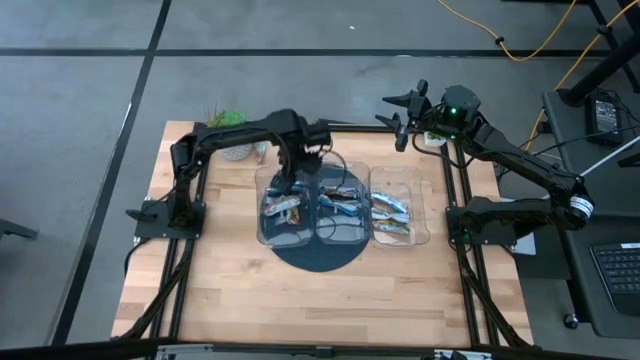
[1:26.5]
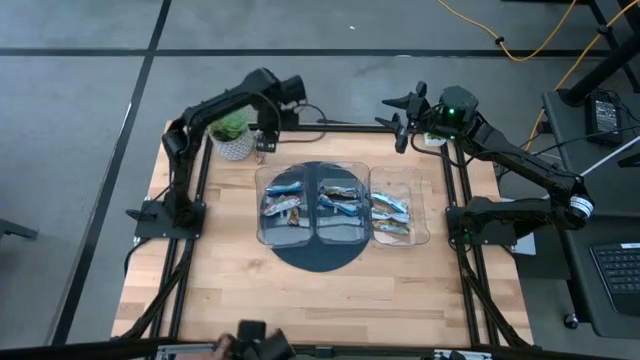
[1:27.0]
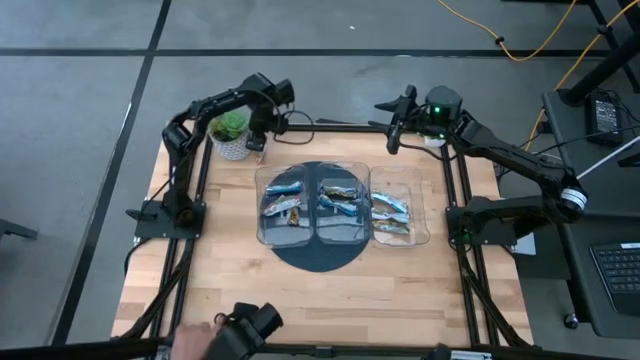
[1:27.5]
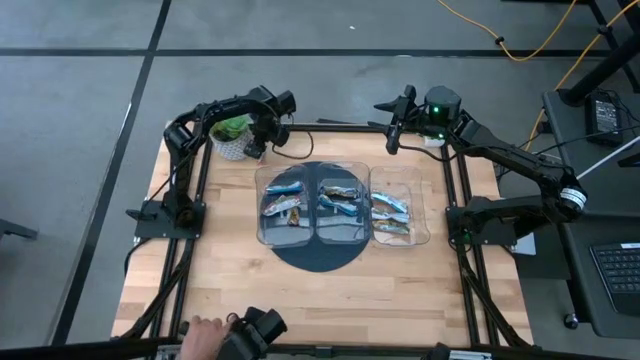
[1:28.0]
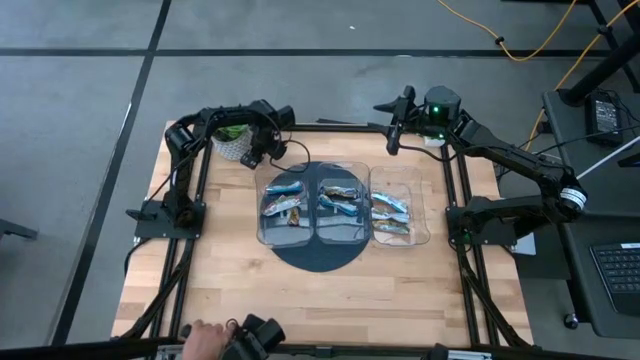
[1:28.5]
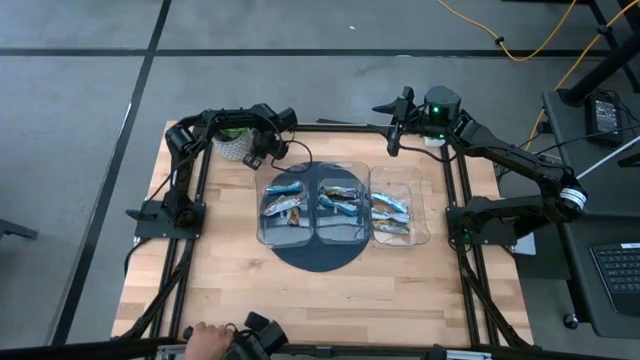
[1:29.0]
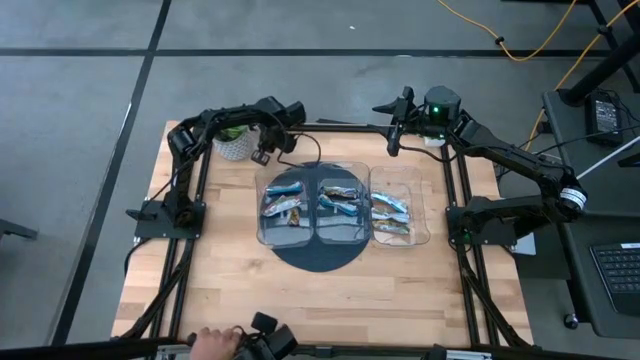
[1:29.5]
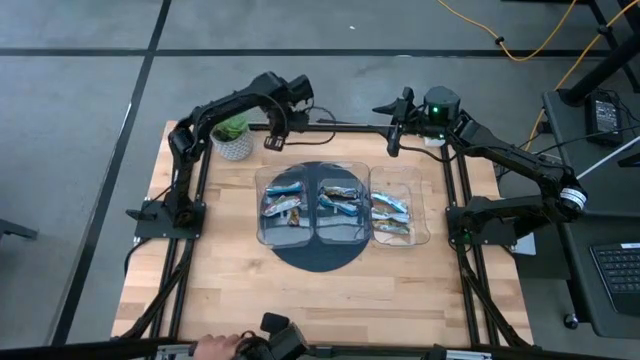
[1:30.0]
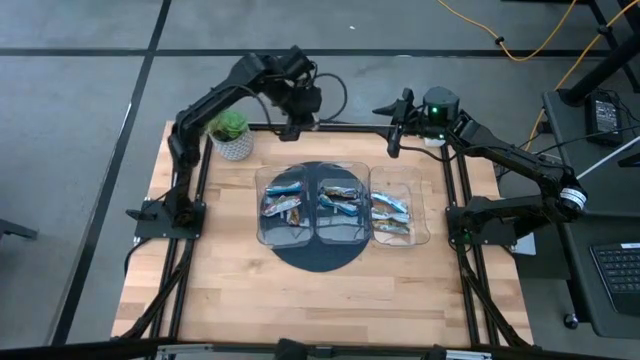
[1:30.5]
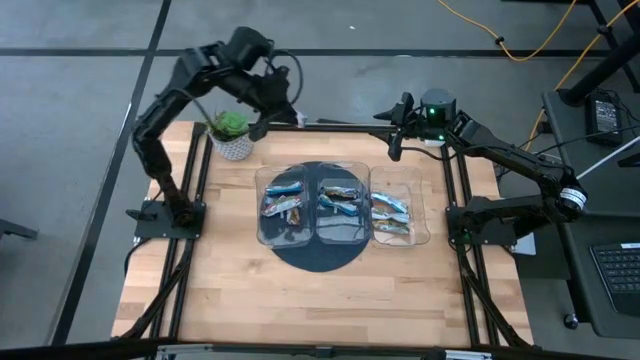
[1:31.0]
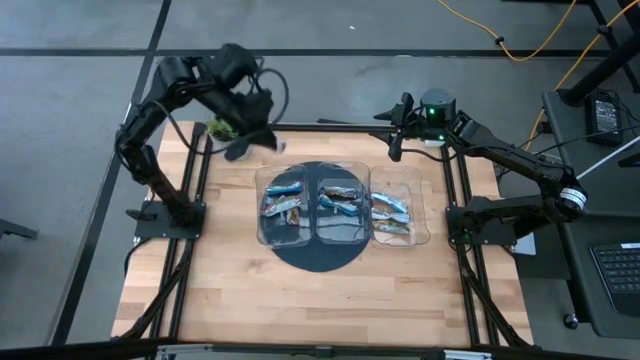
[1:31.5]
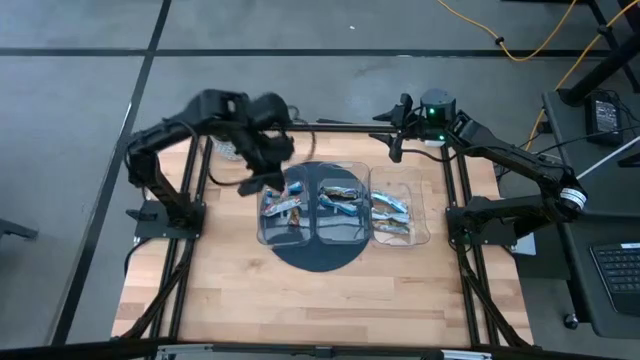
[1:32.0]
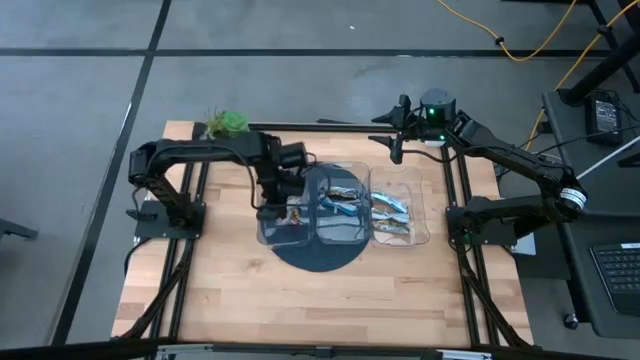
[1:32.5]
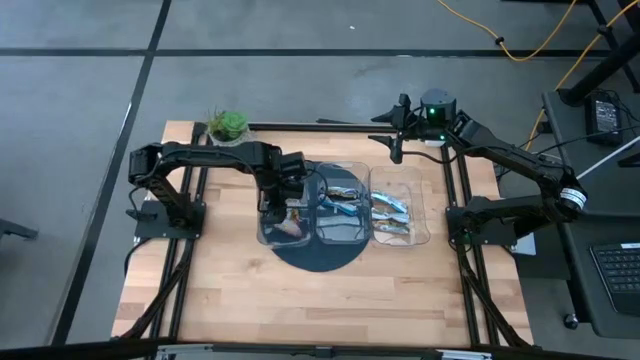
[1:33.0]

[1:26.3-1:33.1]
Task: Pick and place Granola Bars by type
Put the red granola bar into the left transparent bin

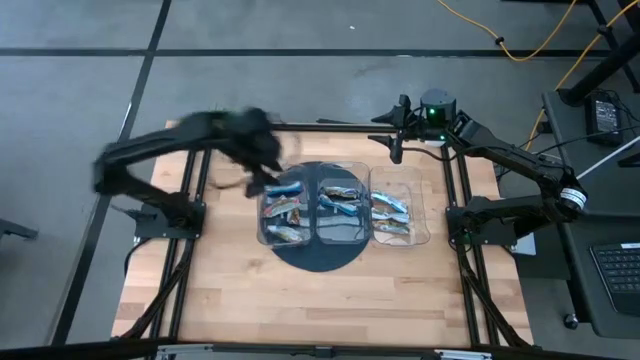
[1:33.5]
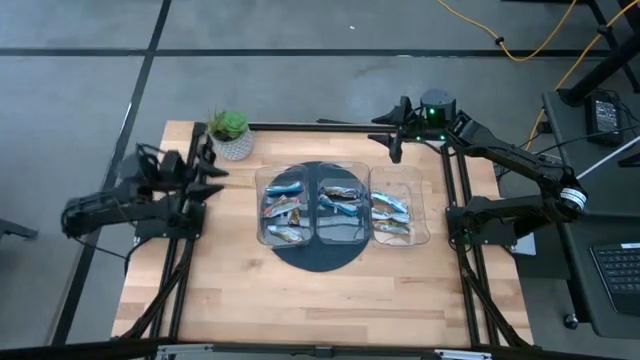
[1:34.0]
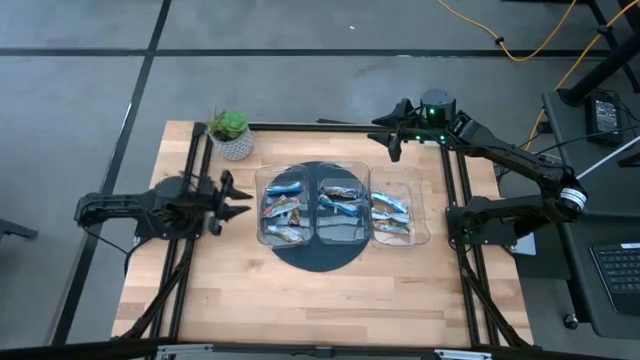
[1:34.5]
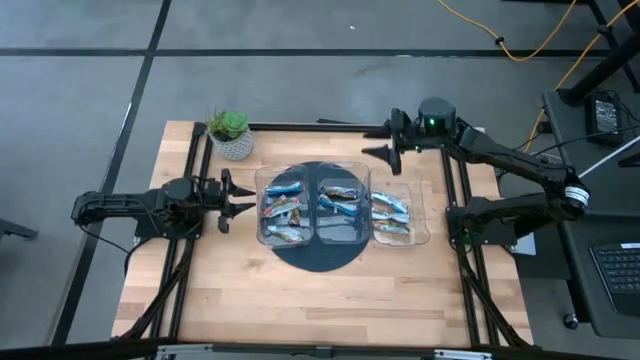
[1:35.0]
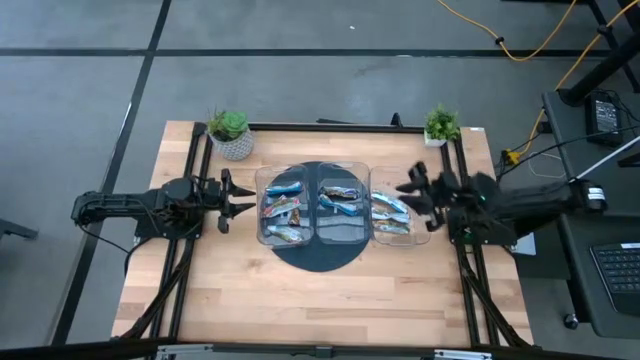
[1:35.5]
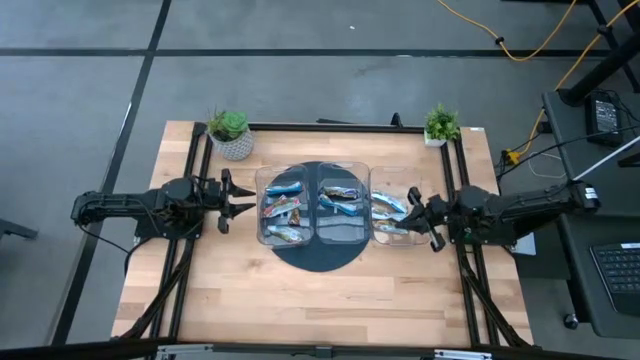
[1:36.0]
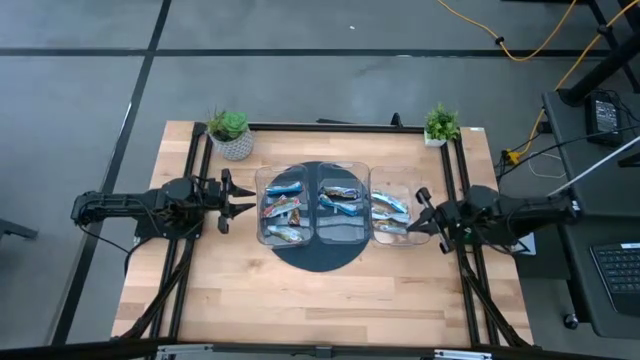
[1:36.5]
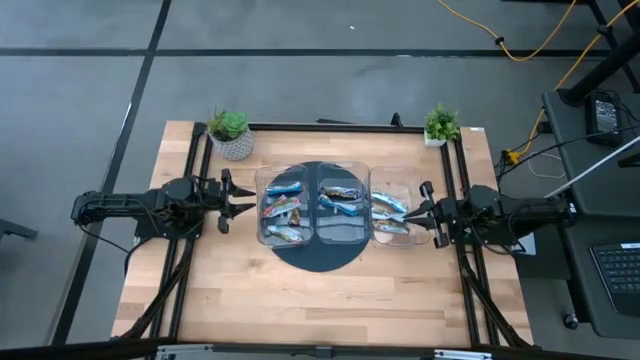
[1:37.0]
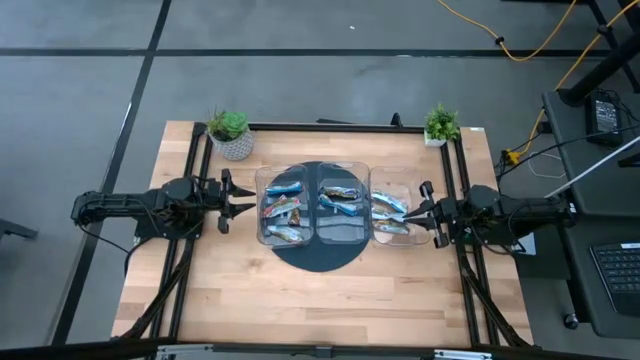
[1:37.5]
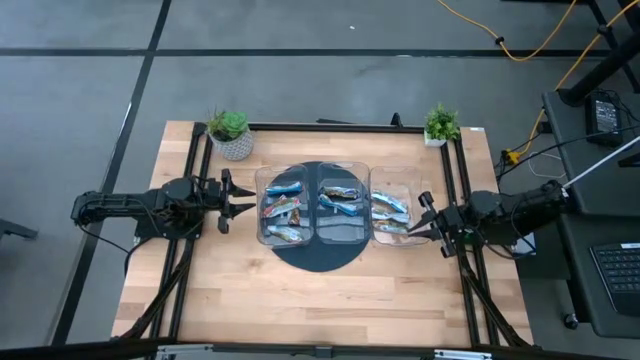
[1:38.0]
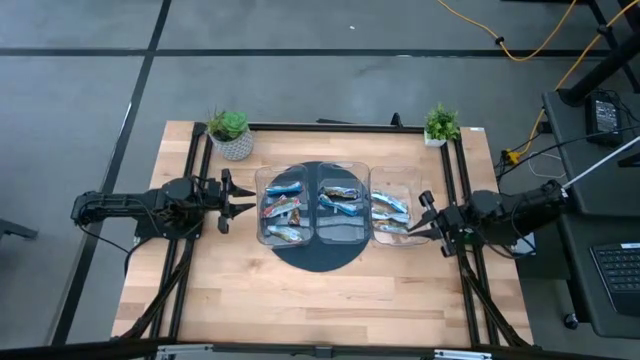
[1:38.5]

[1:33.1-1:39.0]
Return to Home Position

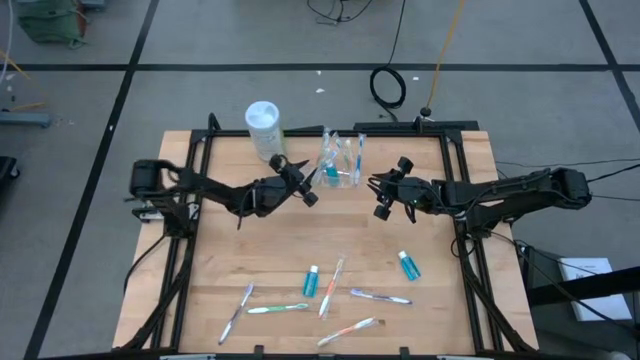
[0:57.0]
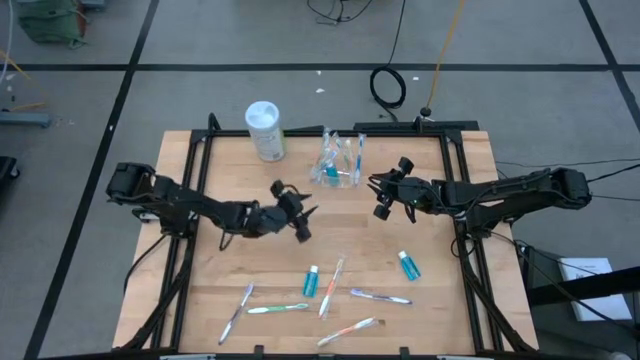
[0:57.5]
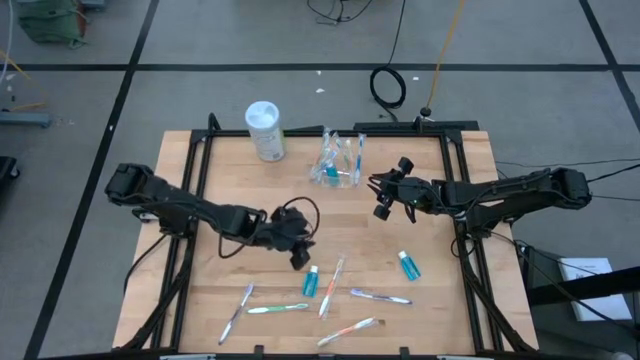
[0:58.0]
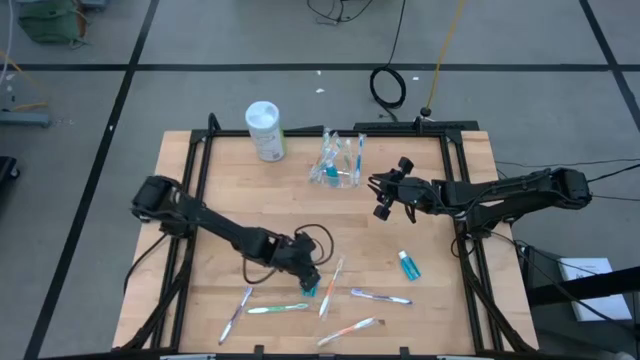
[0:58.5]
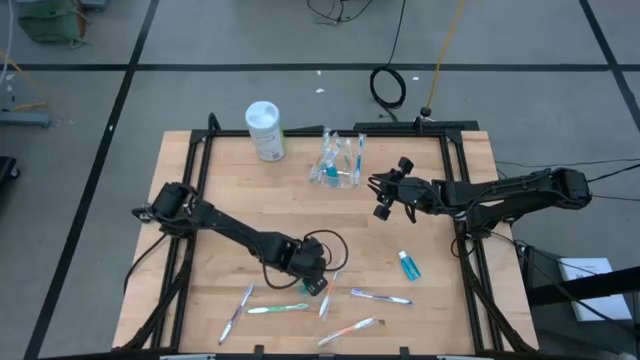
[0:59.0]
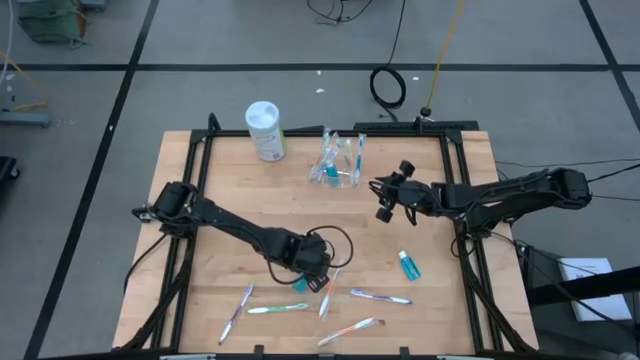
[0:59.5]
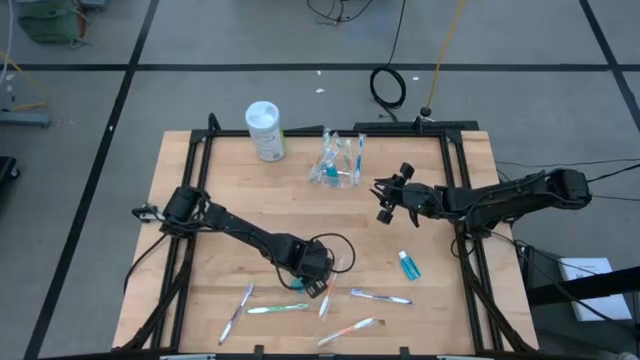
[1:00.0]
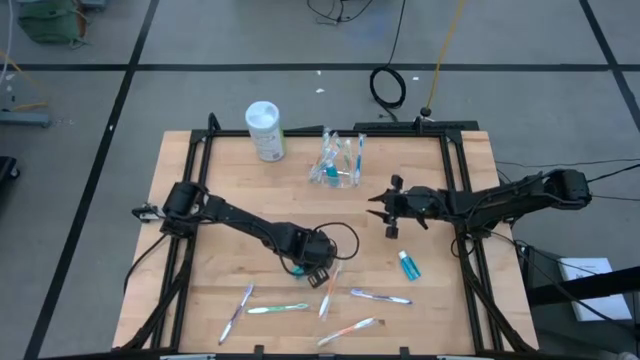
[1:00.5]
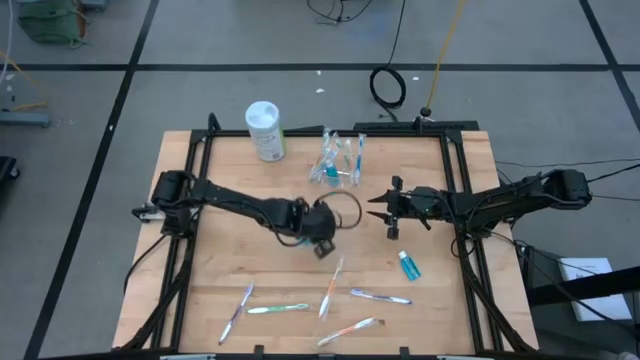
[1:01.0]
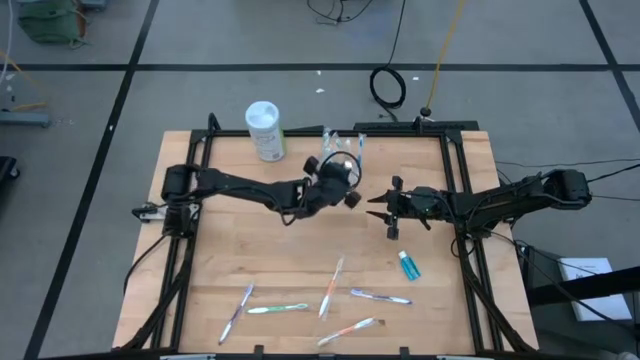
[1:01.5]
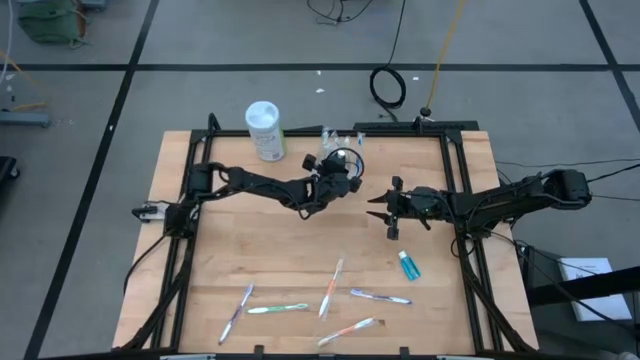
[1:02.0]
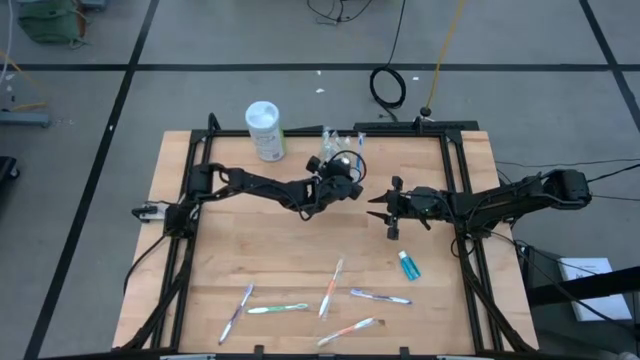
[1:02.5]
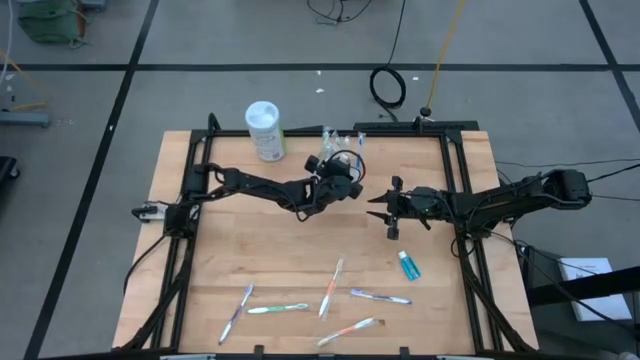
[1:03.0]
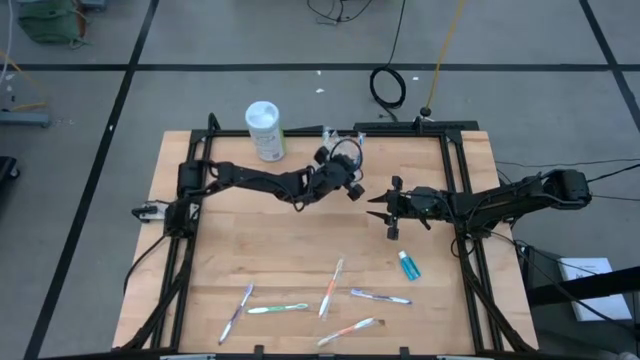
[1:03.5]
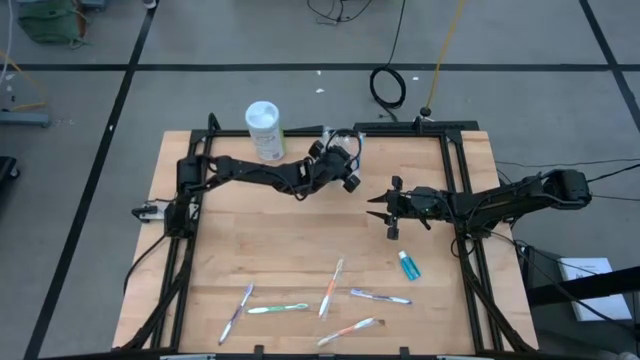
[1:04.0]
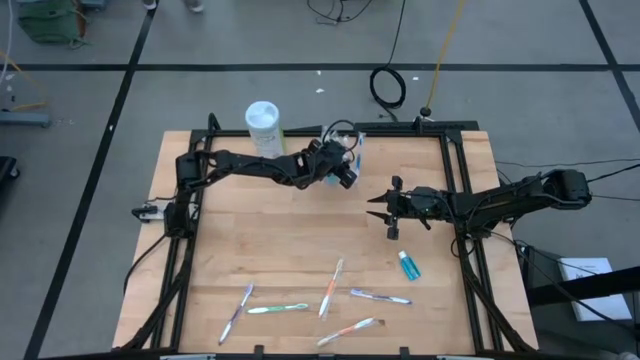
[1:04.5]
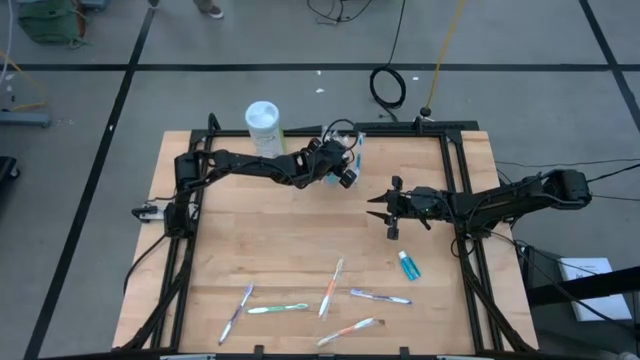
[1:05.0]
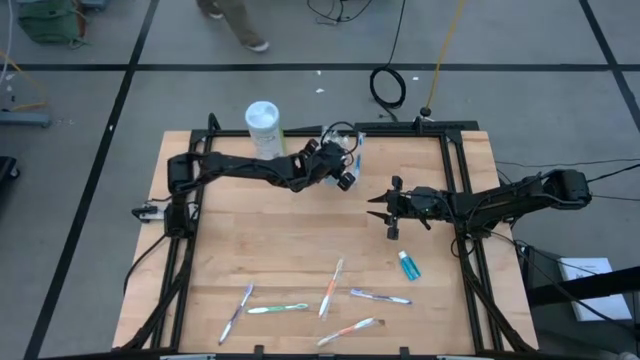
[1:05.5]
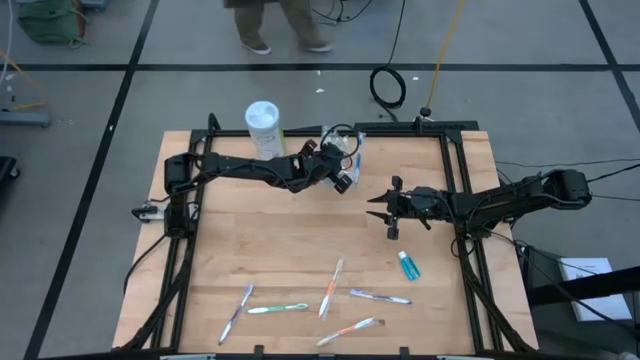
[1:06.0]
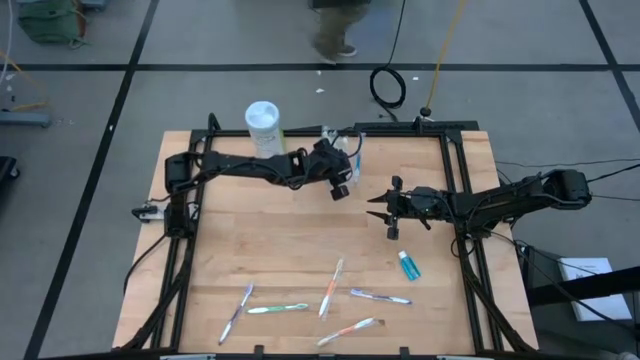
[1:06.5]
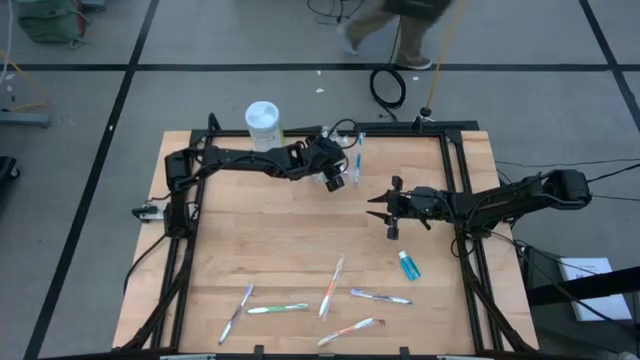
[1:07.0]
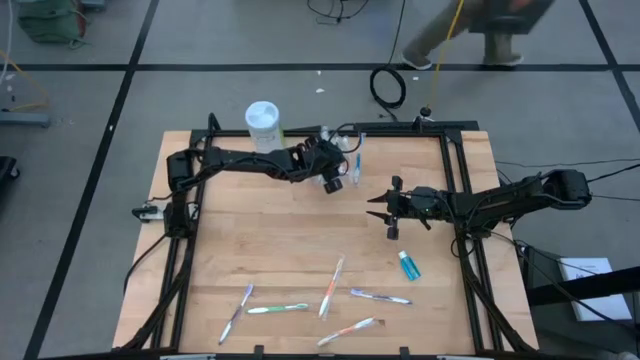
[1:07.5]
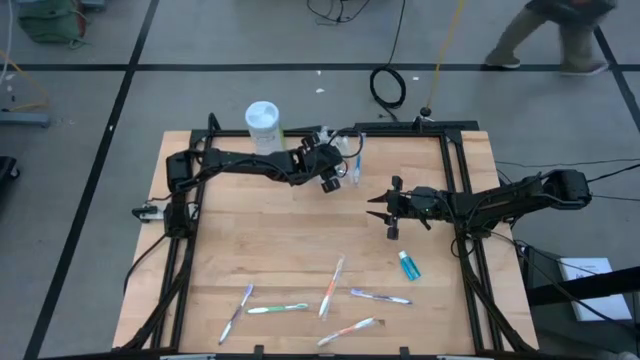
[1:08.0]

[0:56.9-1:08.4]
Task: Pick & Place toothbrushing station
Put the blue mouthwash into the transparent organizer
